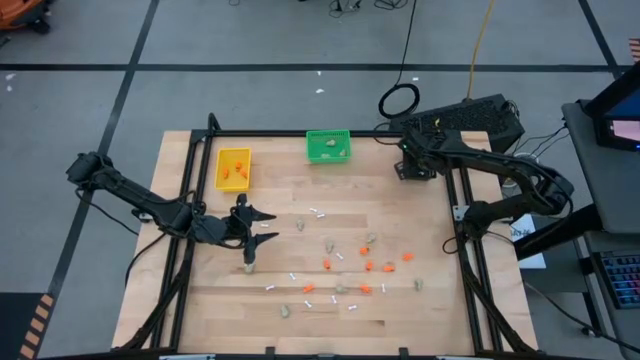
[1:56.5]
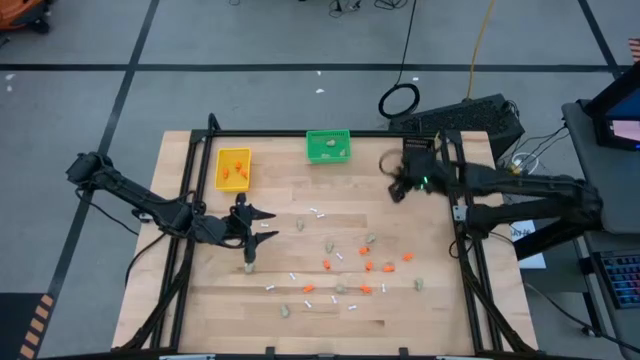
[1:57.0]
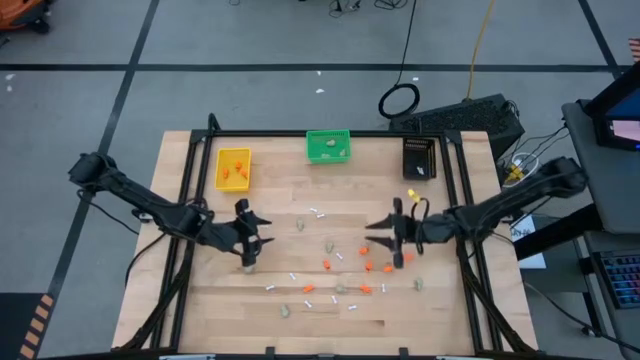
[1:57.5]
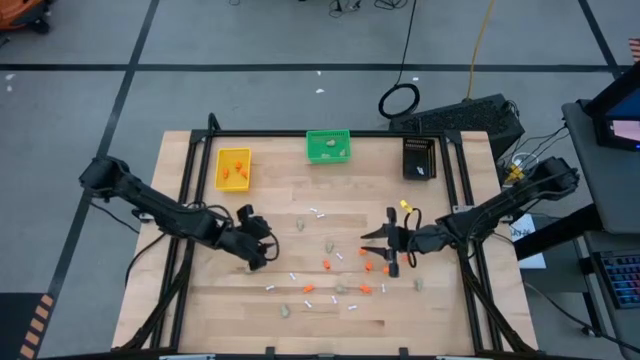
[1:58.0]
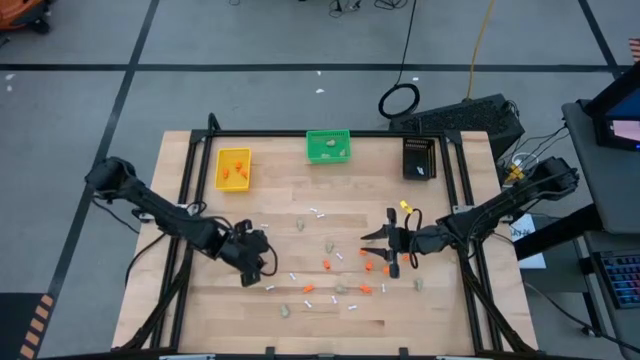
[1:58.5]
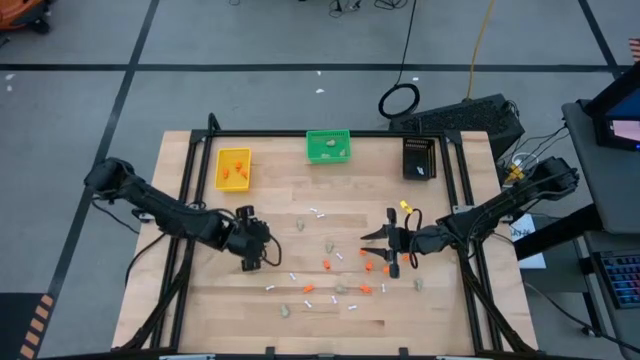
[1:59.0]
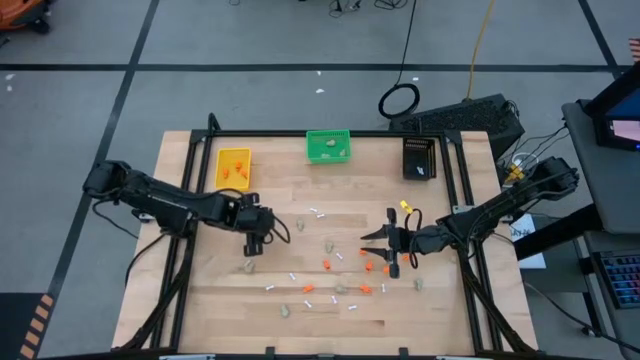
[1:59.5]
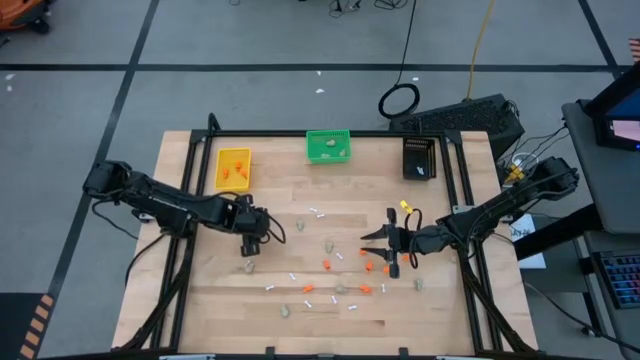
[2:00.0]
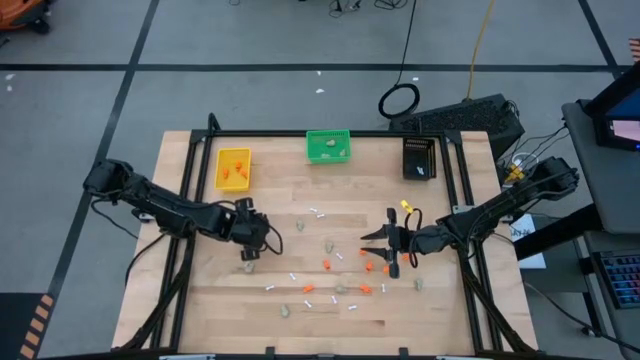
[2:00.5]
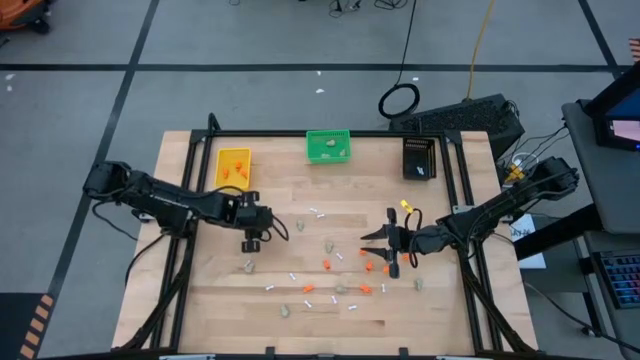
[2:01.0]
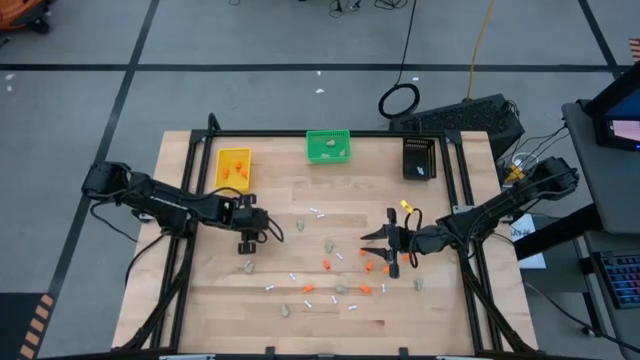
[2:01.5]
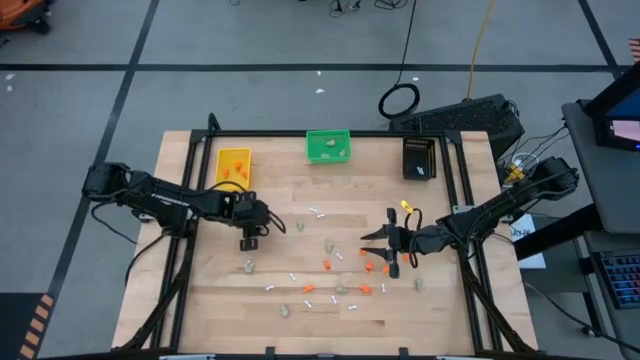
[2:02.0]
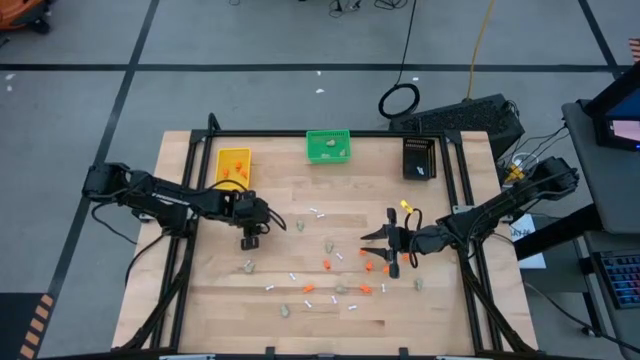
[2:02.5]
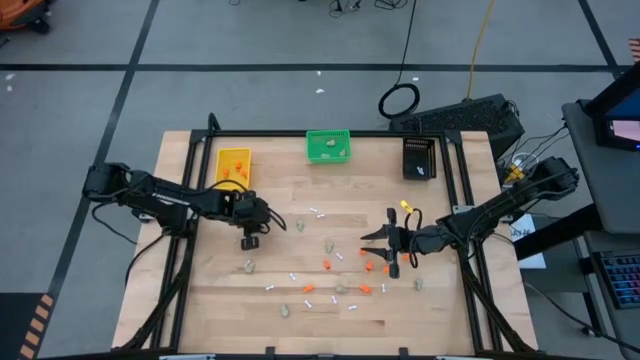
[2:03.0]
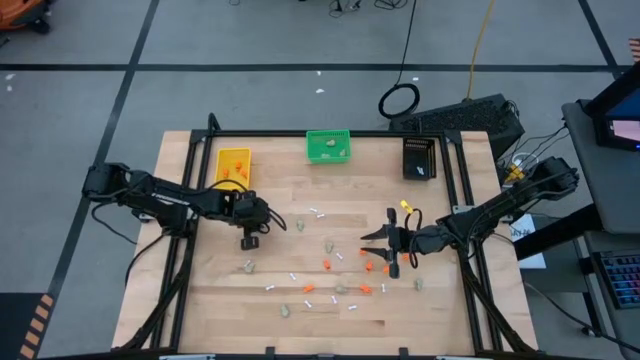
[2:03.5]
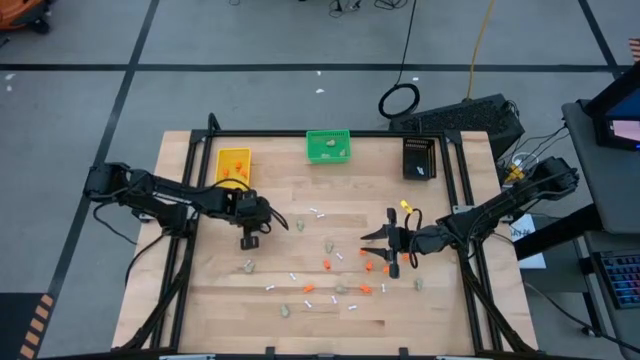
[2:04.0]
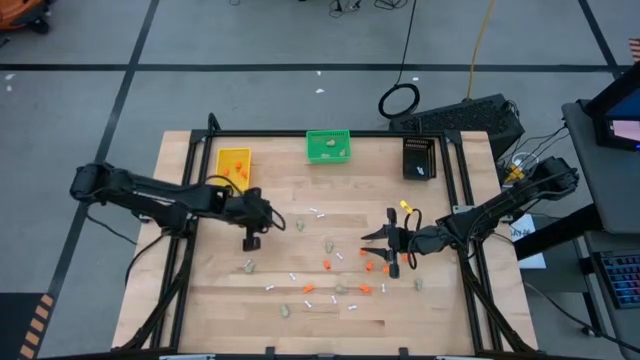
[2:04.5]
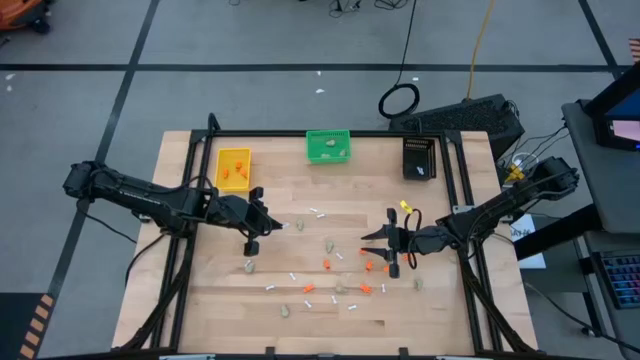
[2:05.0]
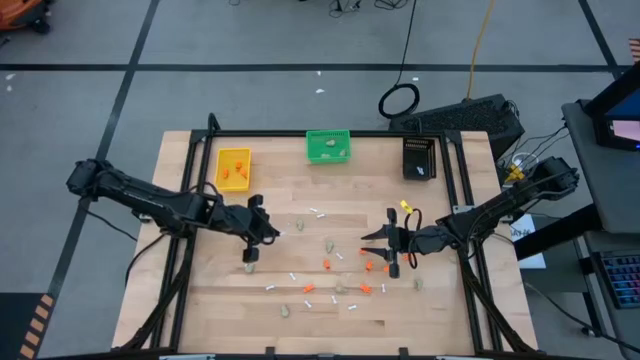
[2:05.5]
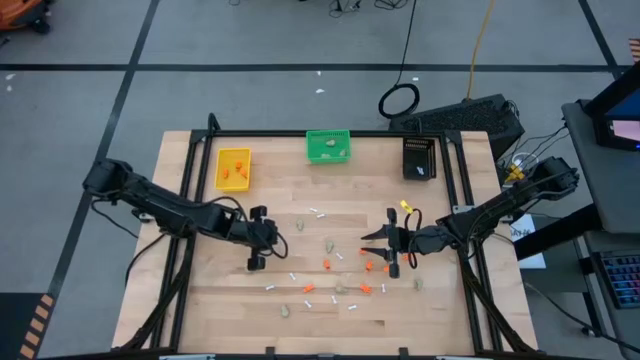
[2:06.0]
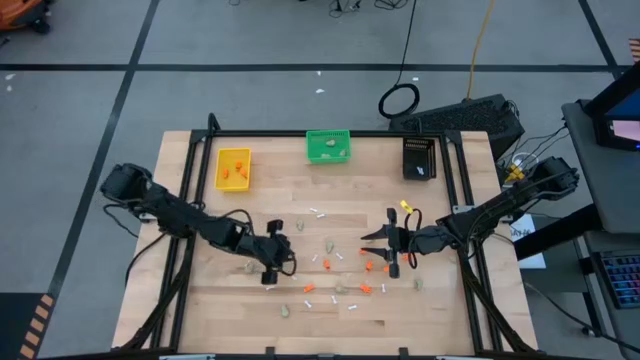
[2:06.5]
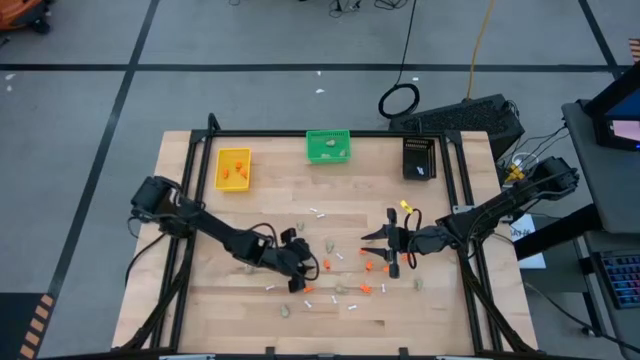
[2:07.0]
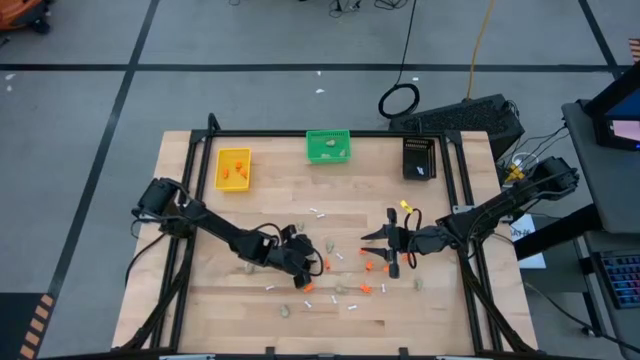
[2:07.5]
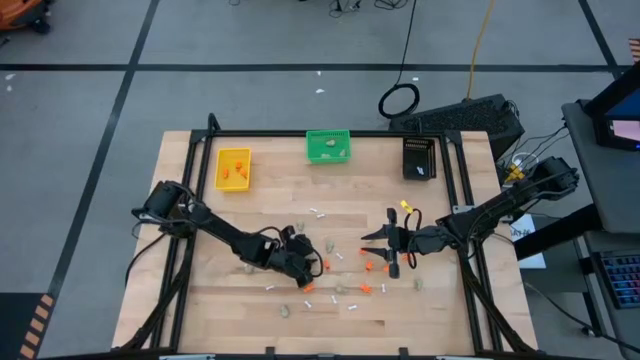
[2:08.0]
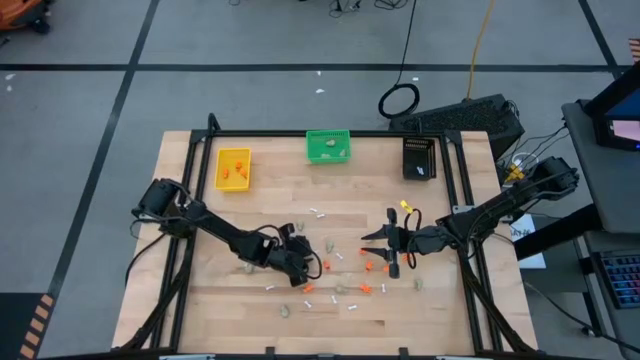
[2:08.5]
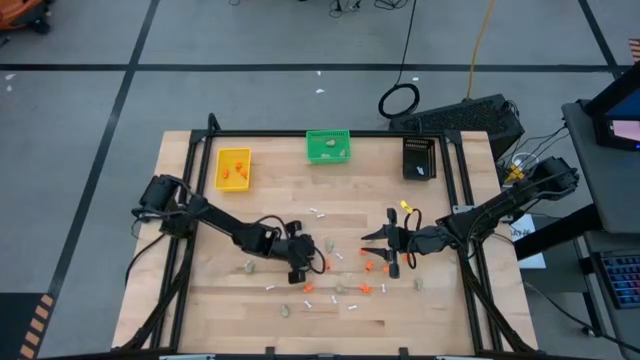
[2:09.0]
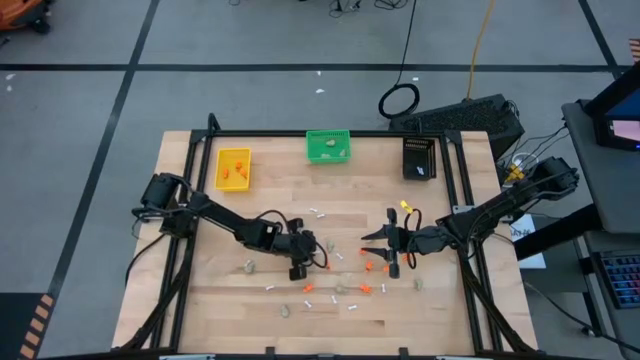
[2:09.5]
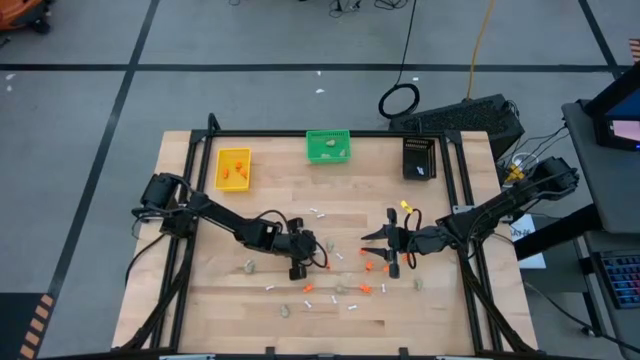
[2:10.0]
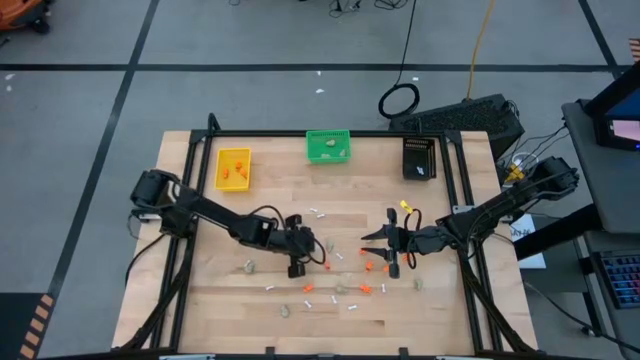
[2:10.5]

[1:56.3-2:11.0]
Task: Sort Halloween decoration
Put the white bone toy into the black bin

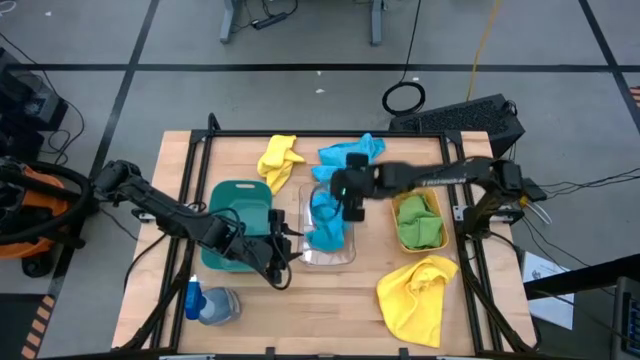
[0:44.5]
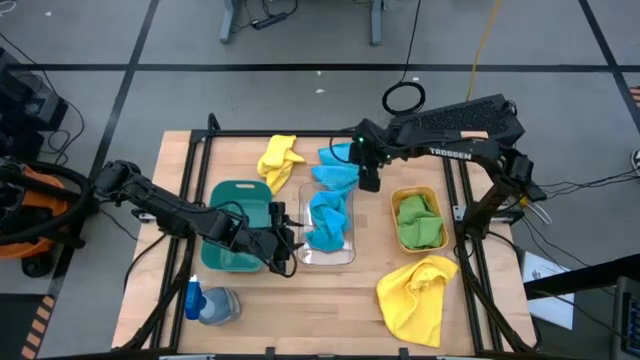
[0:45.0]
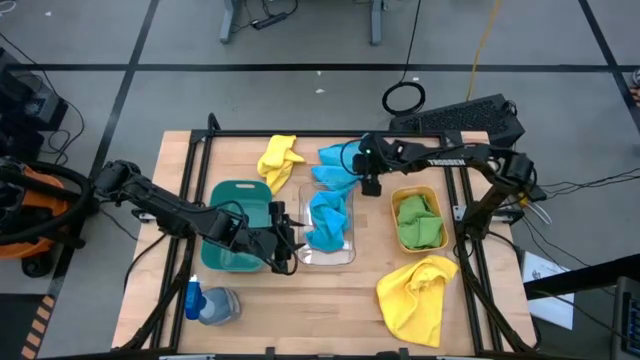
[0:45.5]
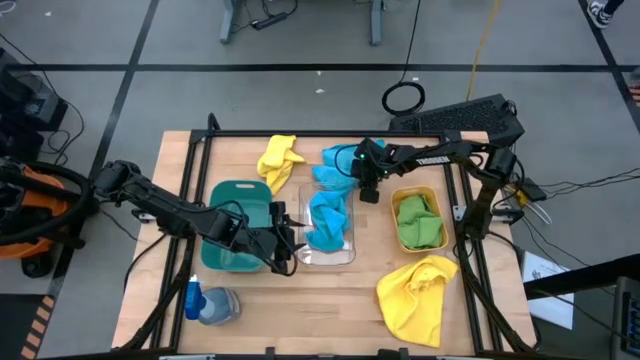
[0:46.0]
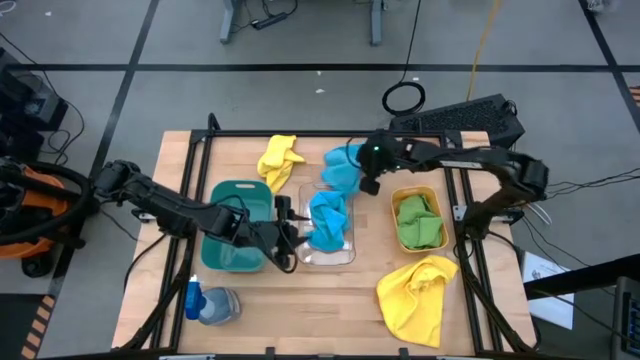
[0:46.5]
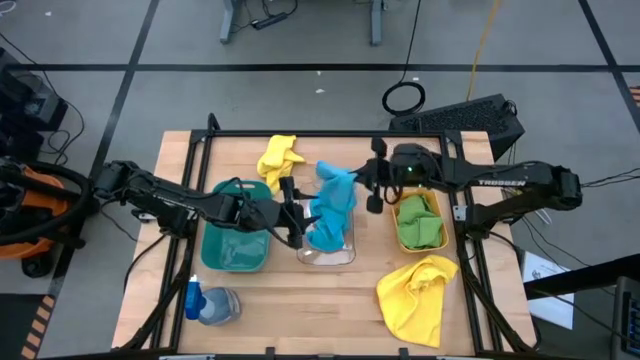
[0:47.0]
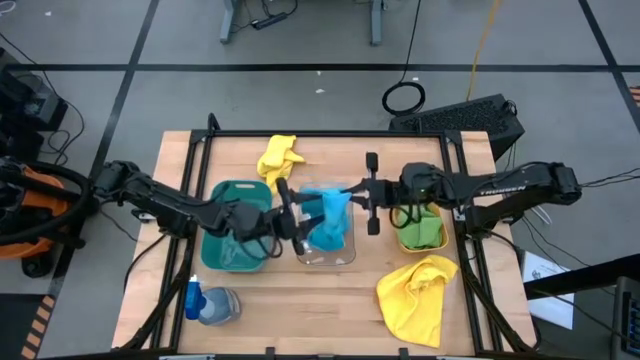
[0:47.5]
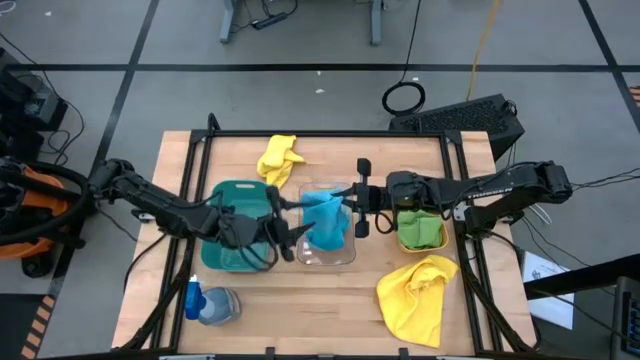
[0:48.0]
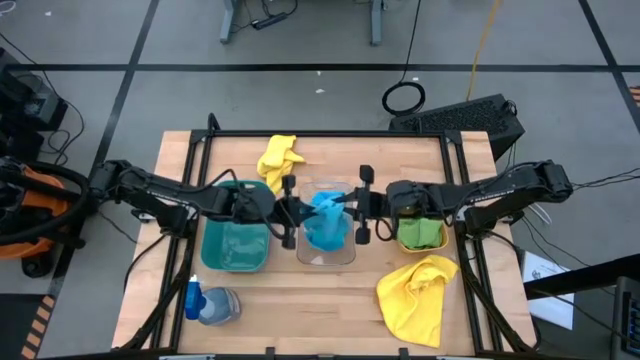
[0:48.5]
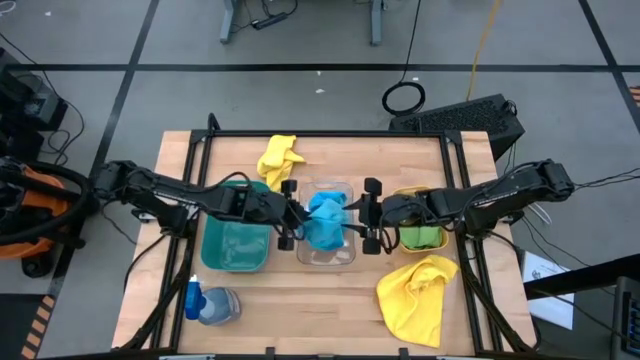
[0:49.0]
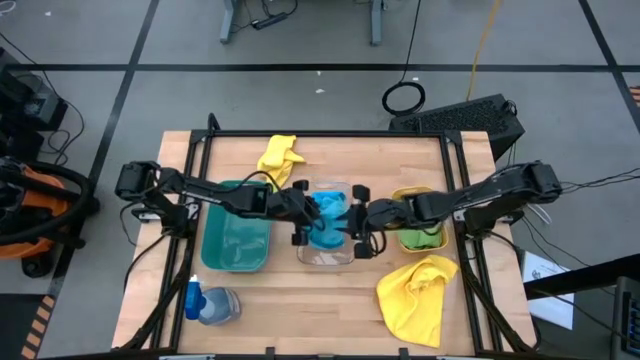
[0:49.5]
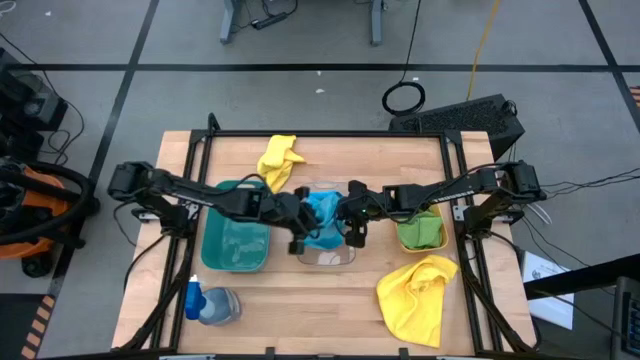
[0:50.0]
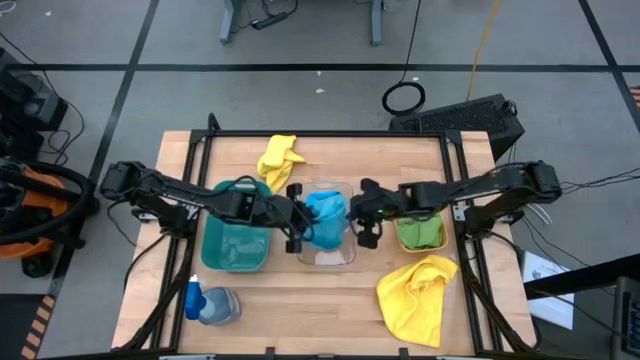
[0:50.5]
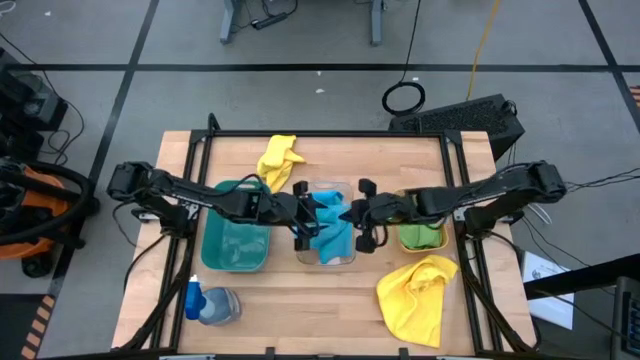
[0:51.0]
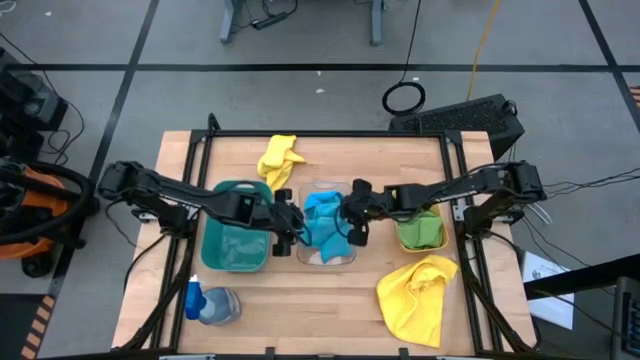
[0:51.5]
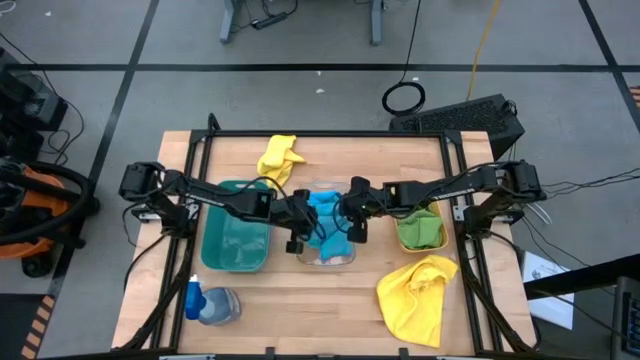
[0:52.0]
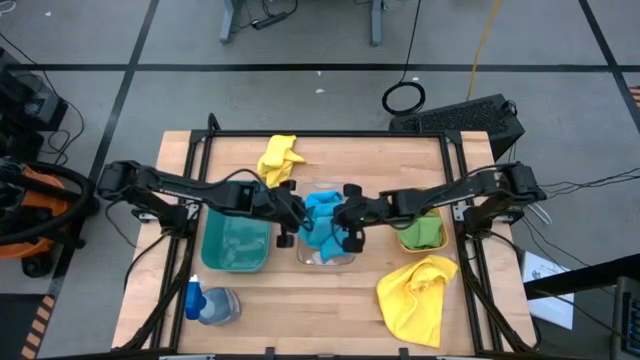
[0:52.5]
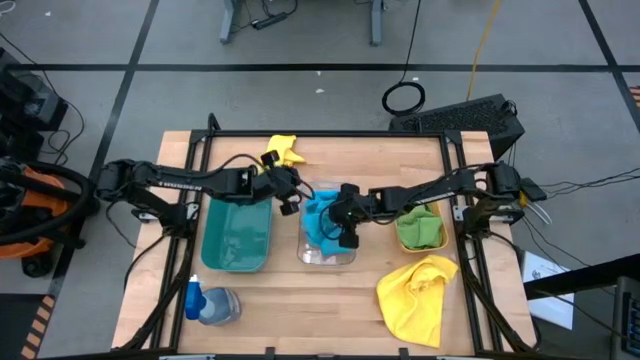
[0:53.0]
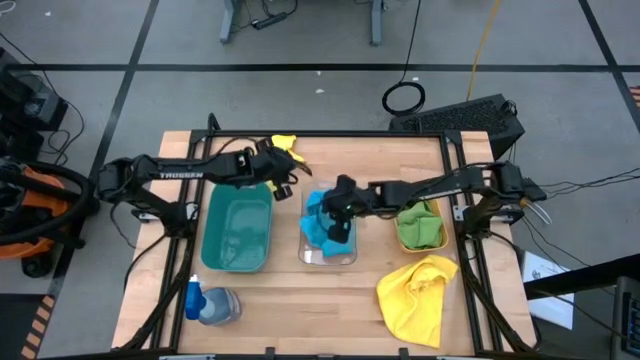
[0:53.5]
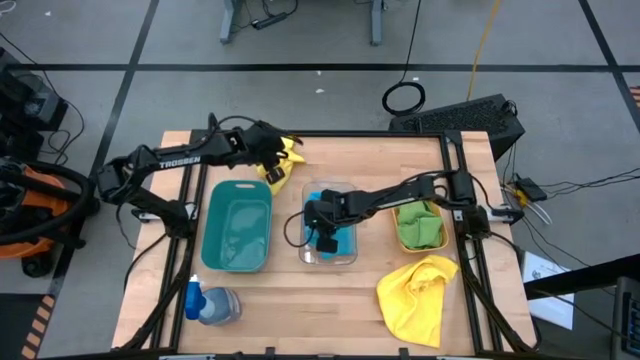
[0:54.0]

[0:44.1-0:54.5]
Task: Sort microfiber towel by color & place in baskets
Put the blue microfiber towel into the transparent bin
